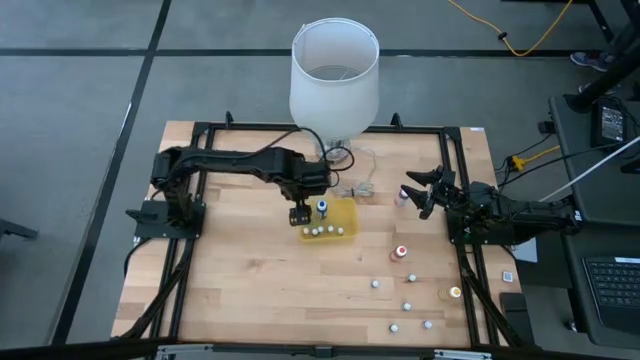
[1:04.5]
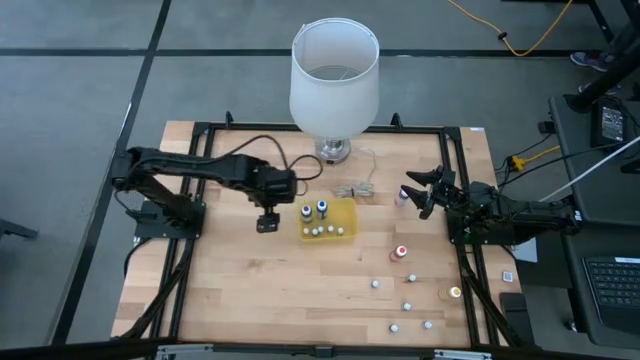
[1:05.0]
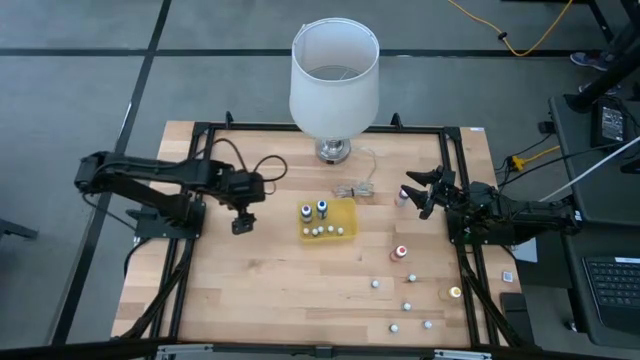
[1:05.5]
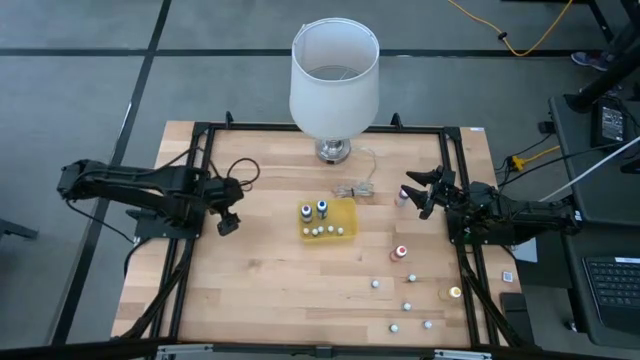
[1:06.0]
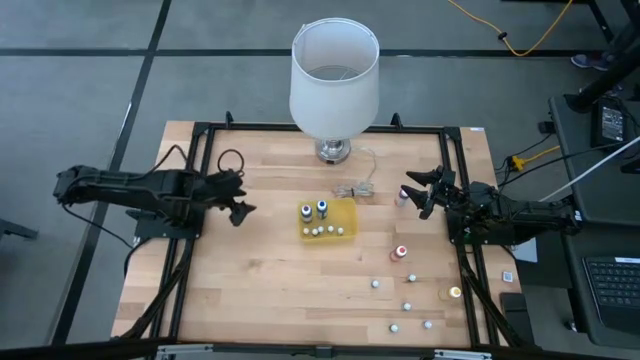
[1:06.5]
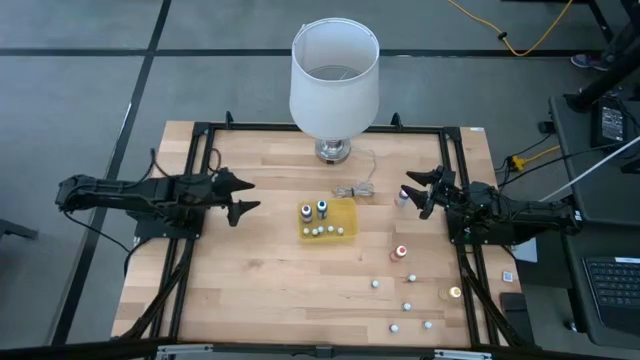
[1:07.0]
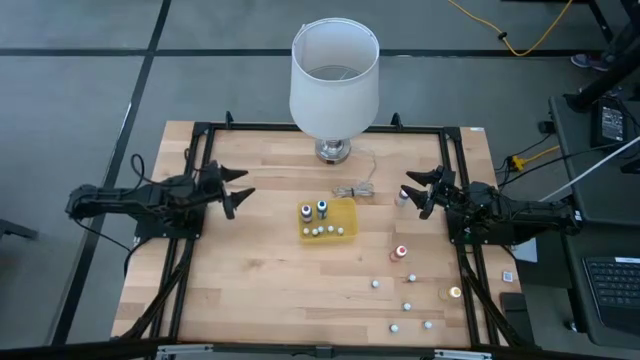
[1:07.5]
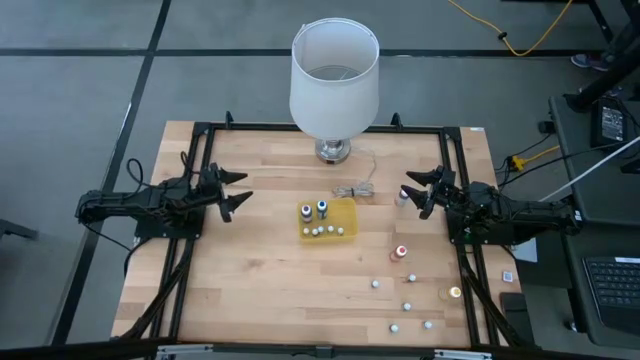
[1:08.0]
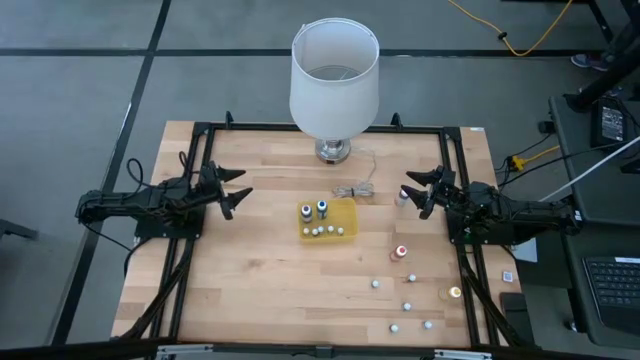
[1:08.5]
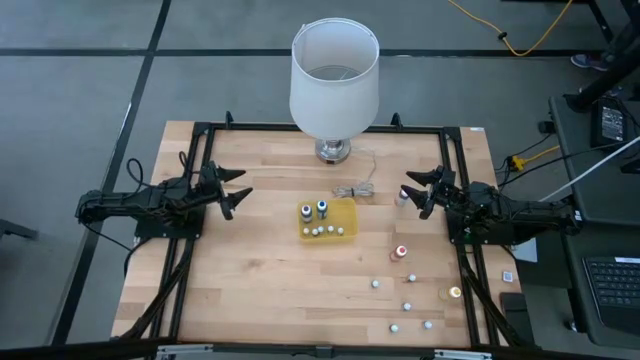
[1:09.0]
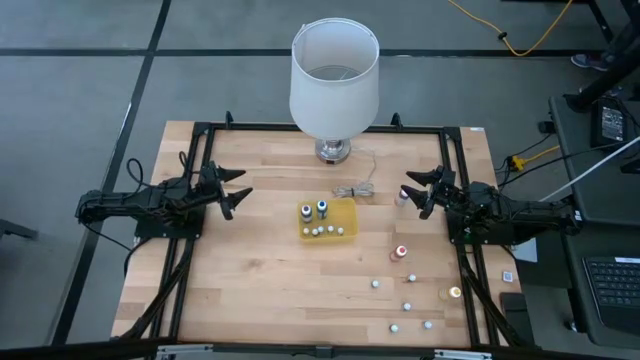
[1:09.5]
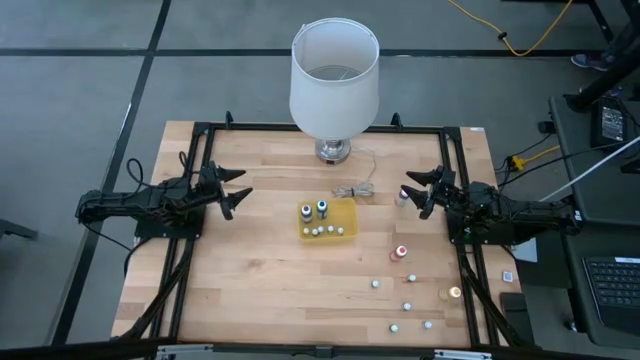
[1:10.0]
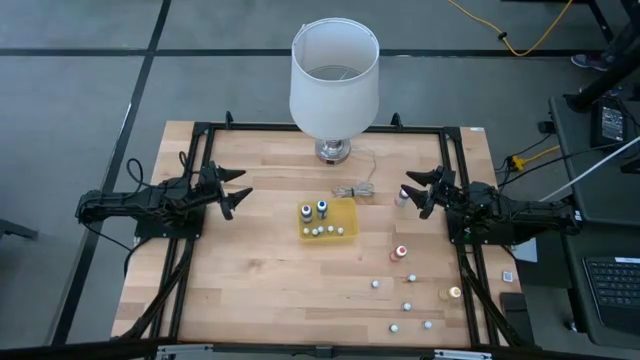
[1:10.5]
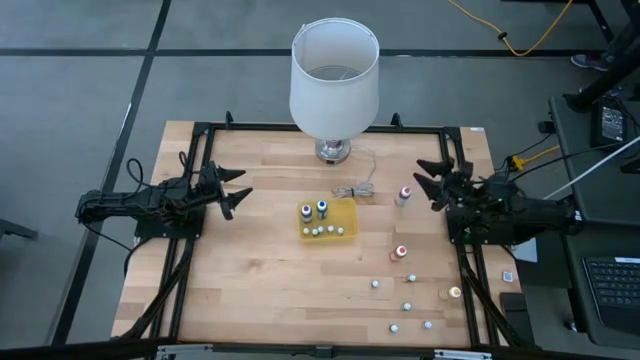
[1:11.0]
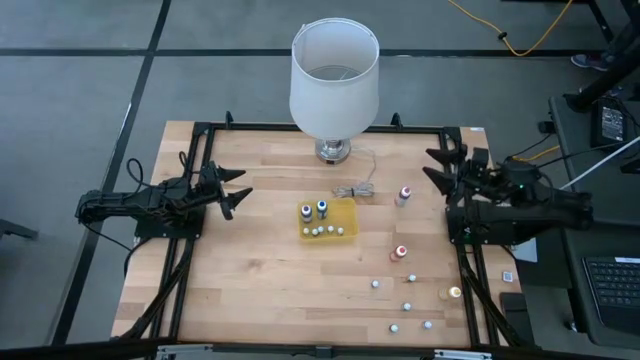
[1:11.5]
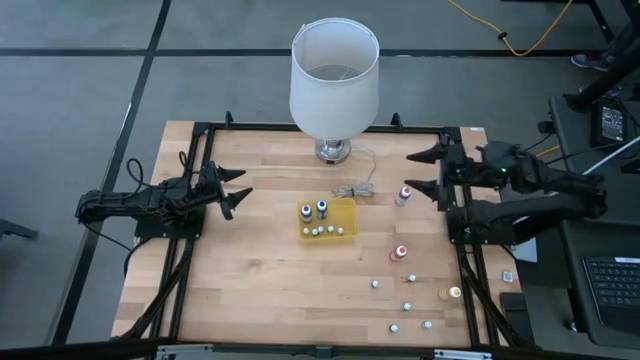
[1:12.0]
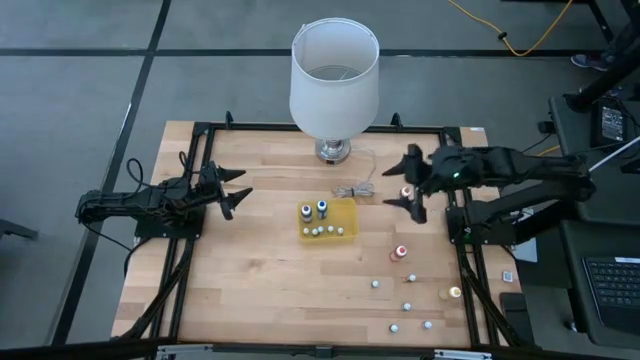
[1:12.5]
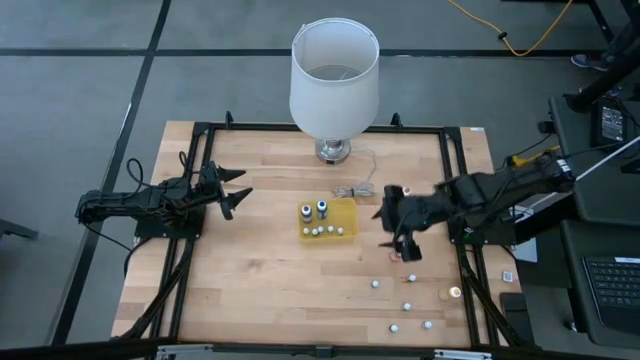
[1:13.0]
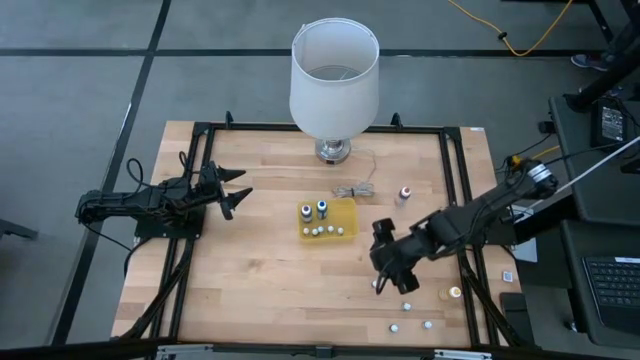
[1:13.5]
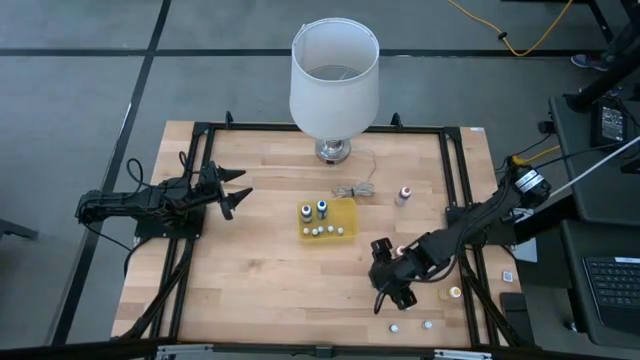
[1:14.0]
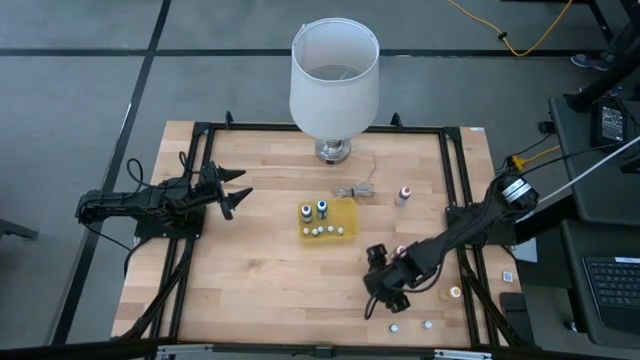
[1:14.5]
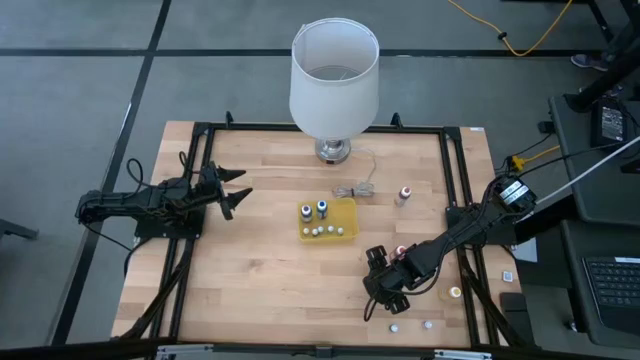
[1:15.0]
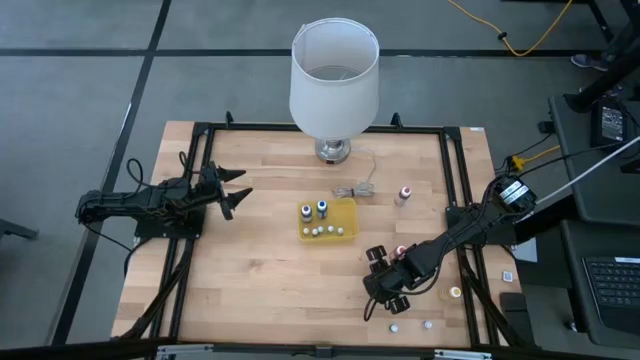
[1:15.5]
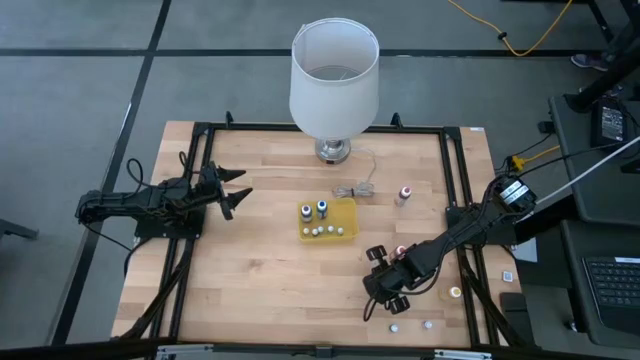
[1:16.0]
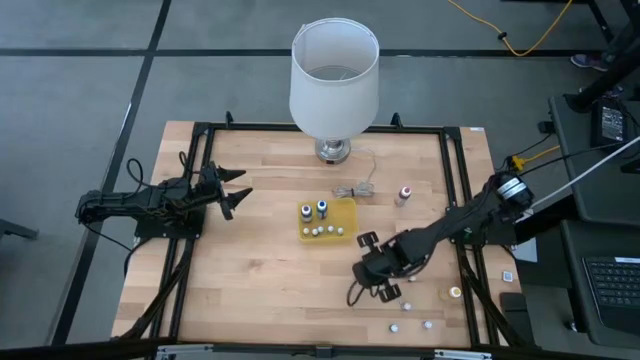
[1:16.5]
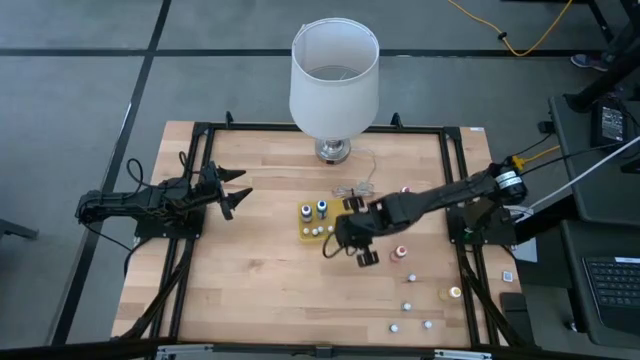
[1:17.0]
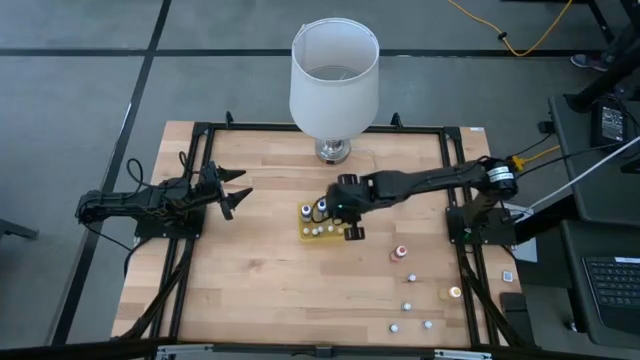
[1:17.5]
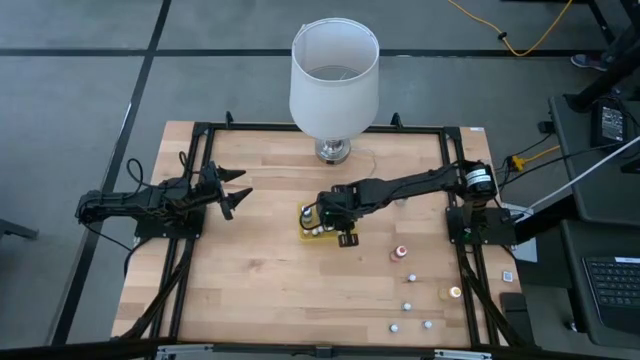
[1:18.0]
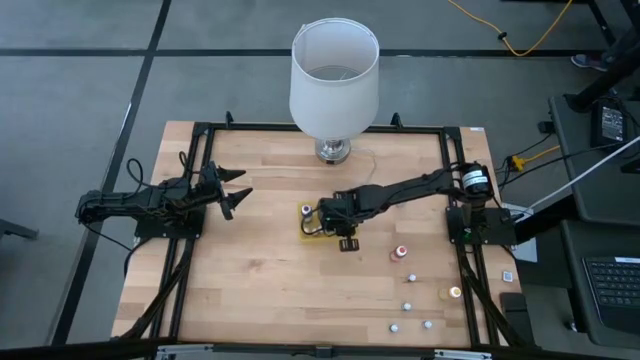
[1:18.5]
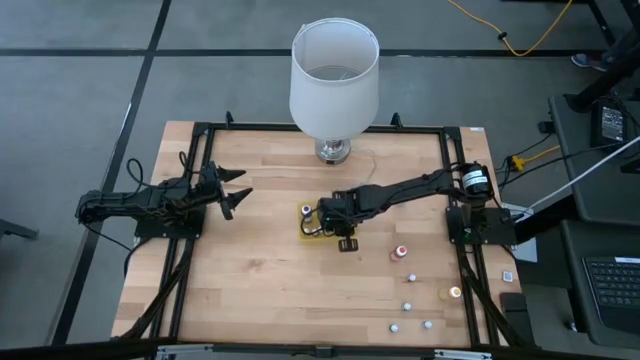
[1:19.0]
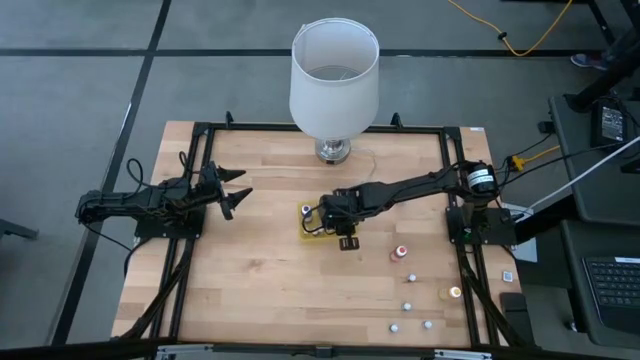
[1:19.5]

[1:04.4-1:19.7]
Task: Pick & Place food coloring
Put the small purple food coloring bottle into the yellow bin

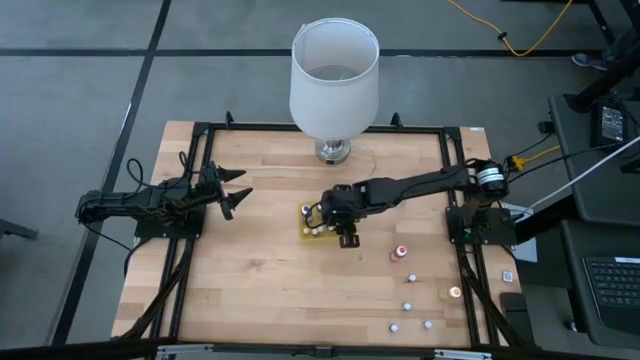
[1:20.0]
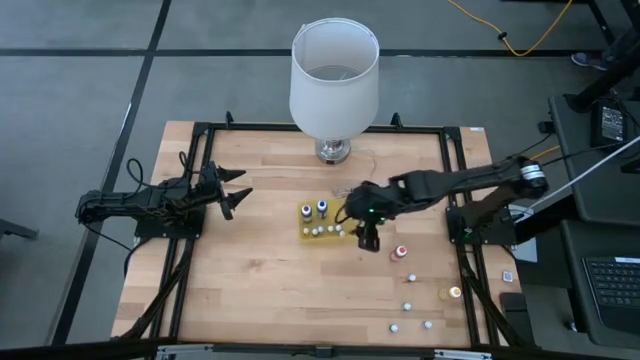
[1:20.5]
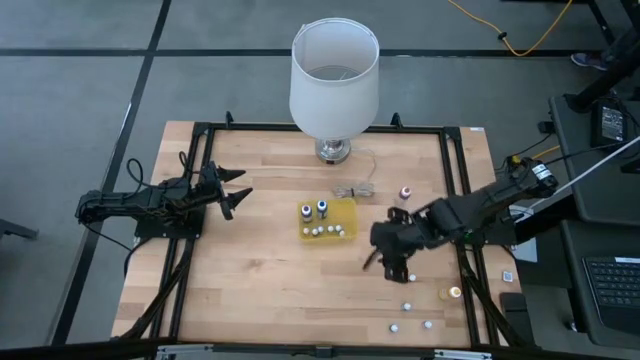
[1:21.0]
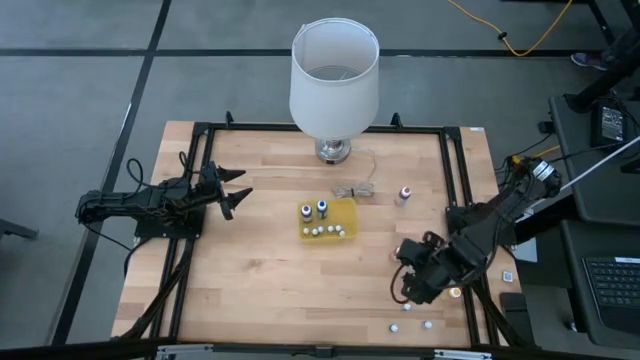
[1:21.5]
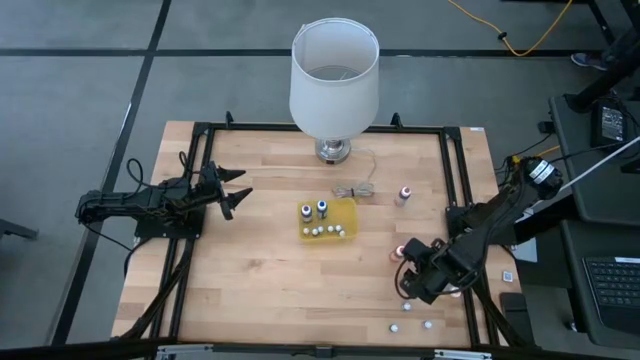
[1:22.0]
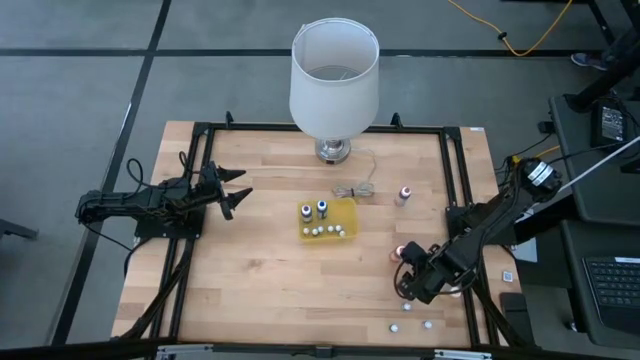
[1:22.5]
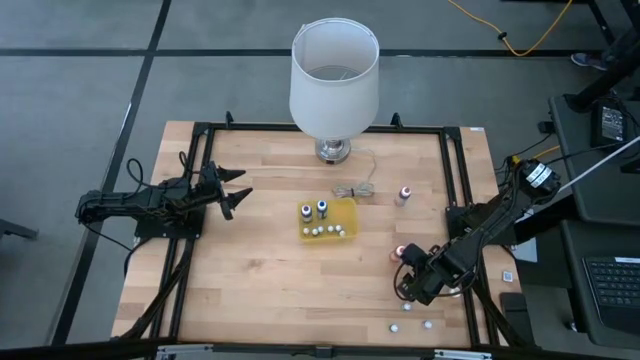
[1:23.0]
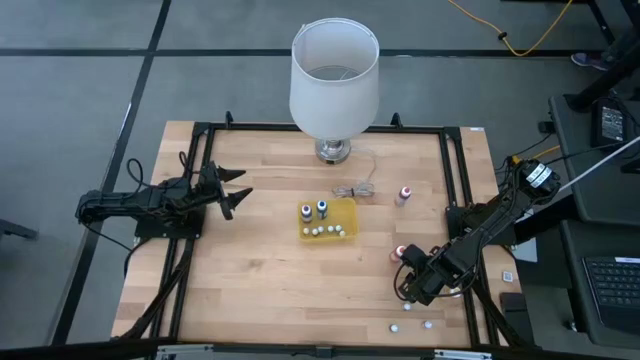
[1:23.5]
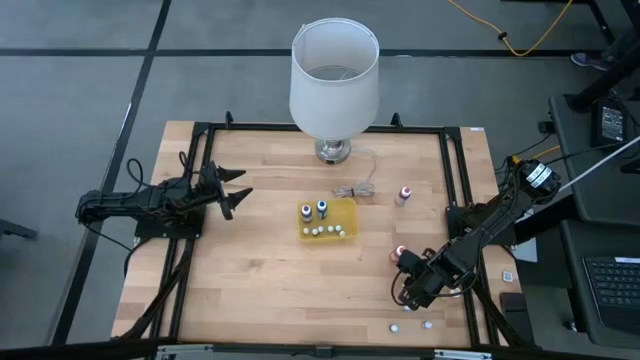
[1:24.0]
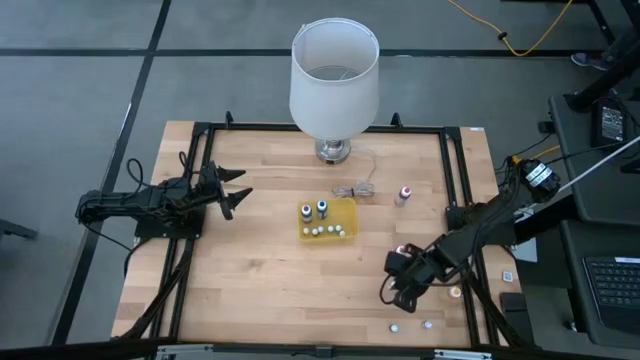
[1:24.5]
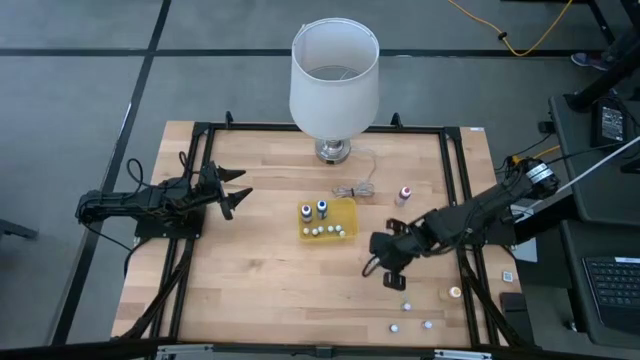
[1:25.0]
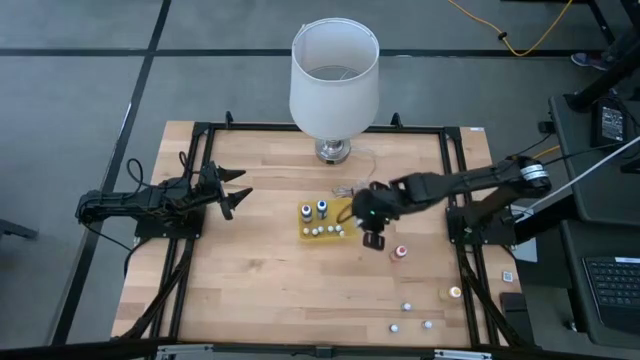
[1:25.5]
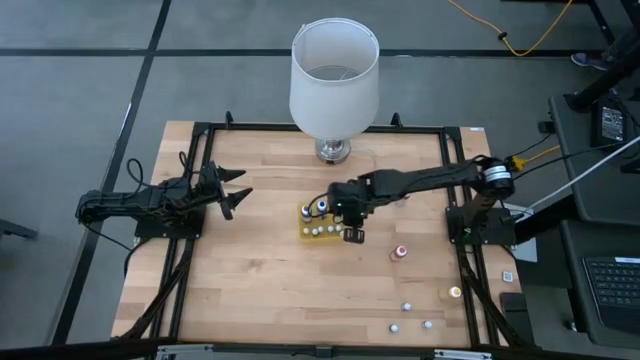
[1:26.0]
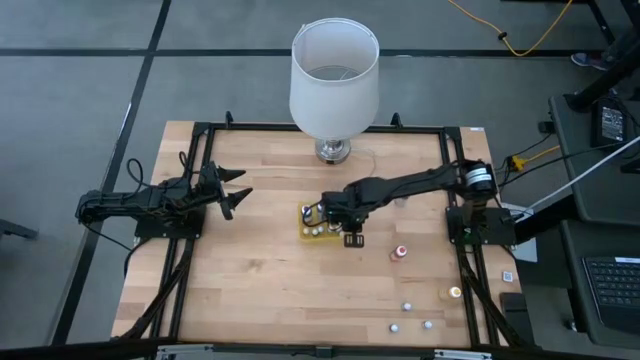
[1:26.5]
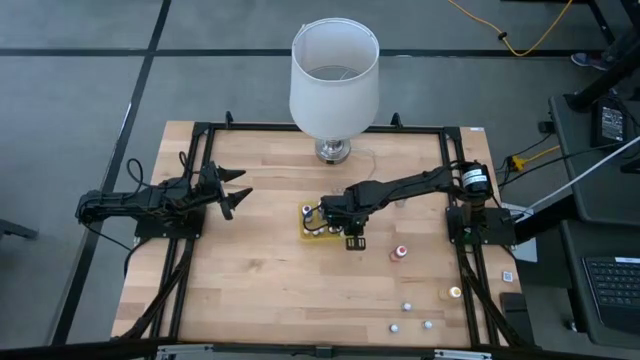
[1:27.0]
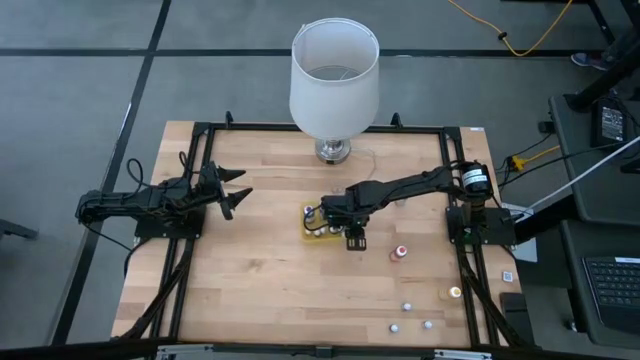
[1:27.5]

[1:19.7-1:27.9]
Put the top small red food coloring bottle into the yellow bin
